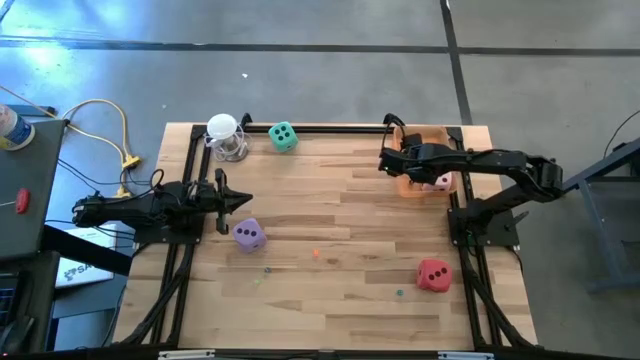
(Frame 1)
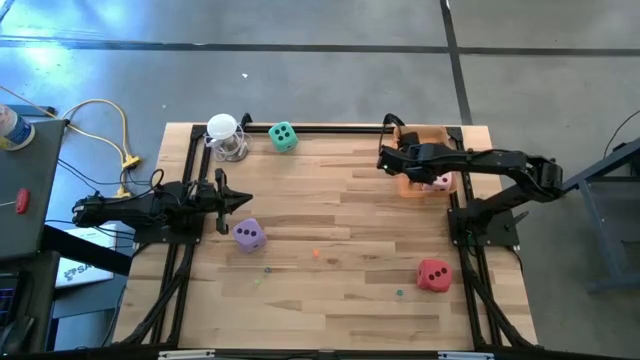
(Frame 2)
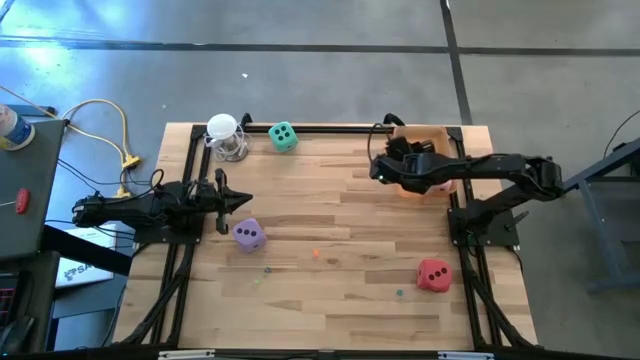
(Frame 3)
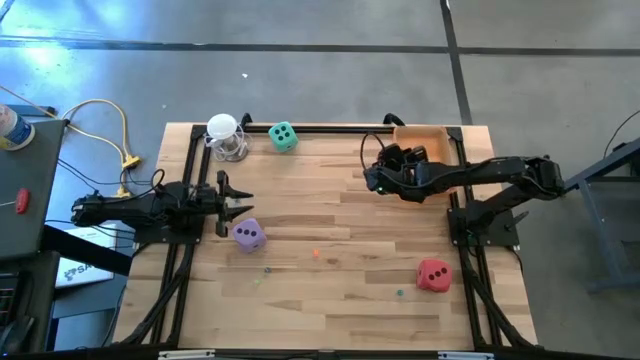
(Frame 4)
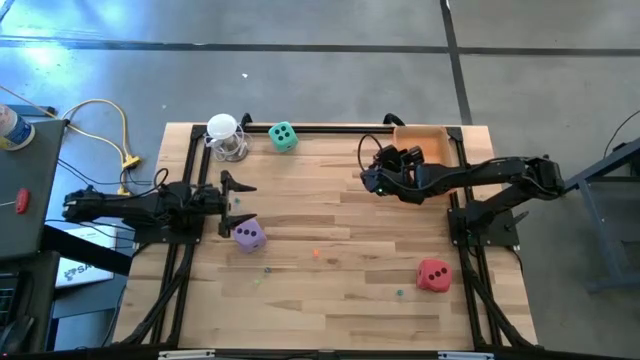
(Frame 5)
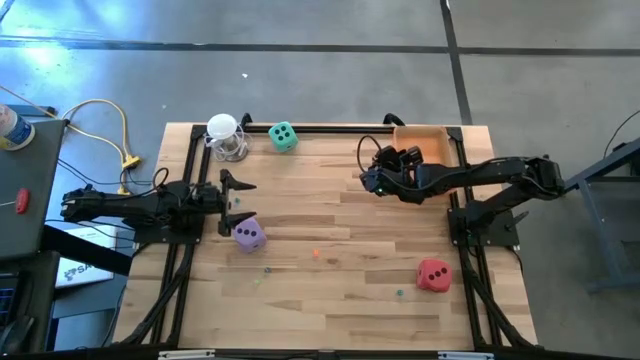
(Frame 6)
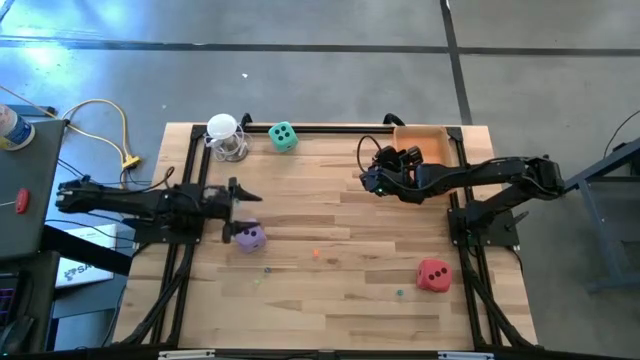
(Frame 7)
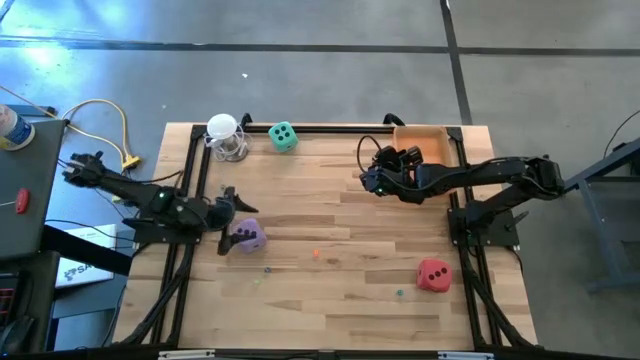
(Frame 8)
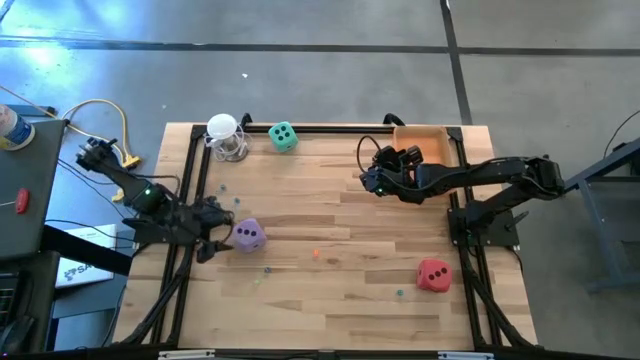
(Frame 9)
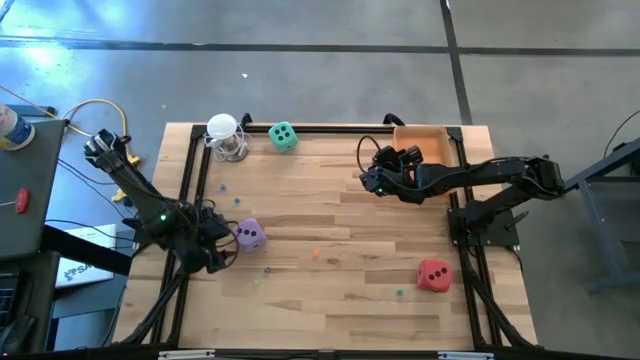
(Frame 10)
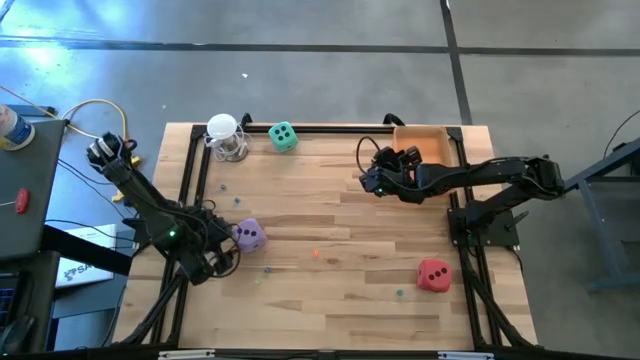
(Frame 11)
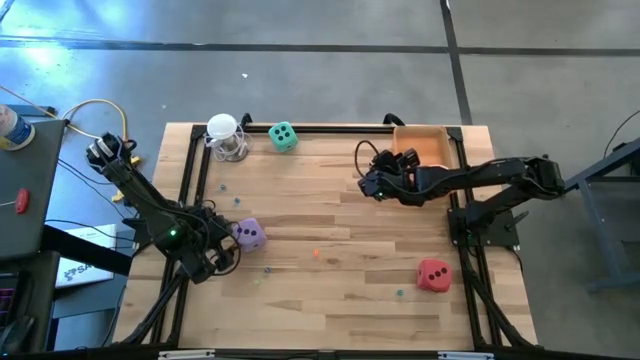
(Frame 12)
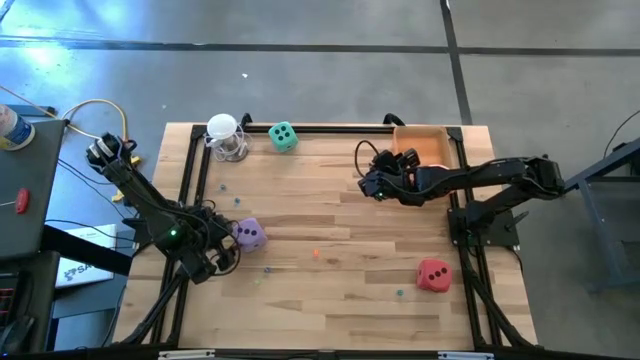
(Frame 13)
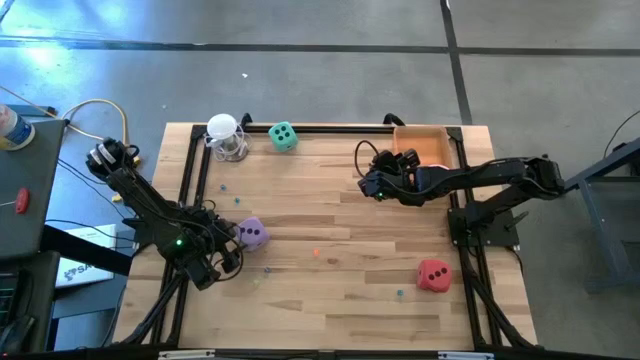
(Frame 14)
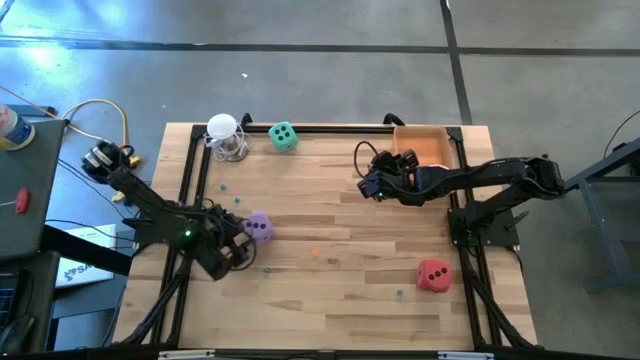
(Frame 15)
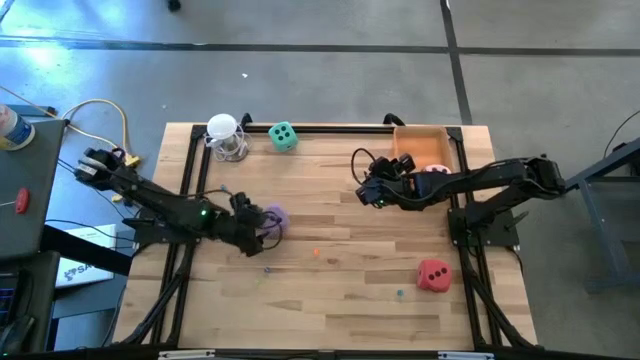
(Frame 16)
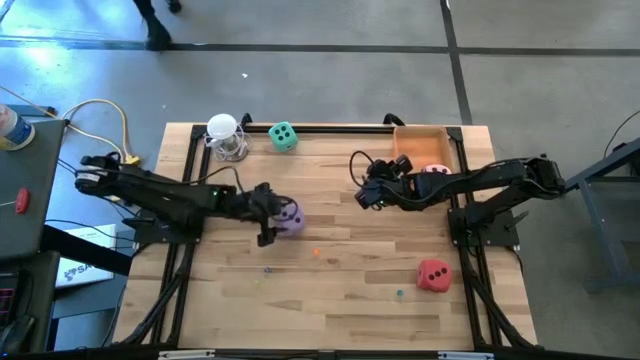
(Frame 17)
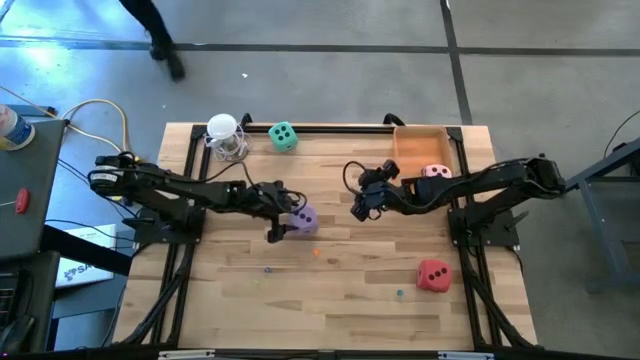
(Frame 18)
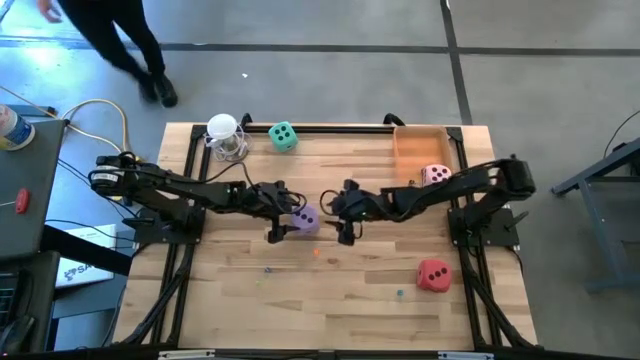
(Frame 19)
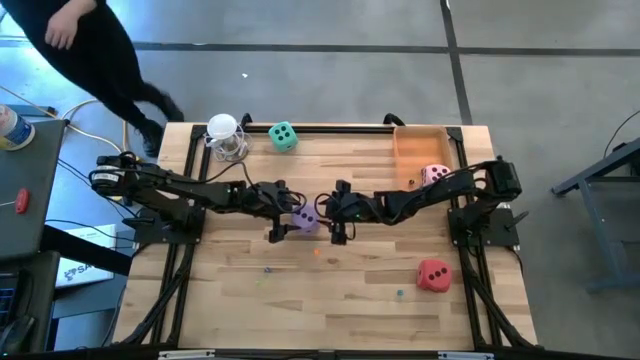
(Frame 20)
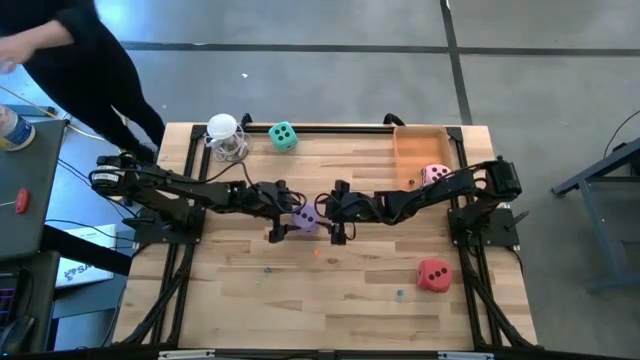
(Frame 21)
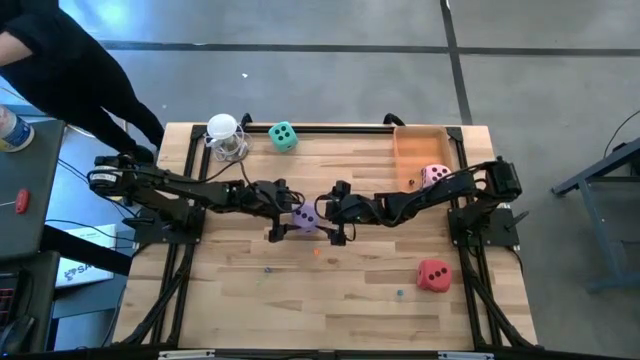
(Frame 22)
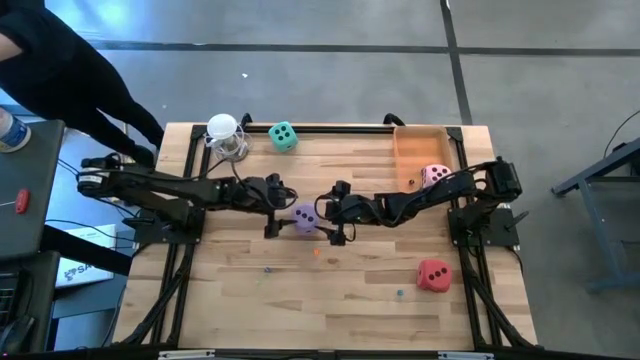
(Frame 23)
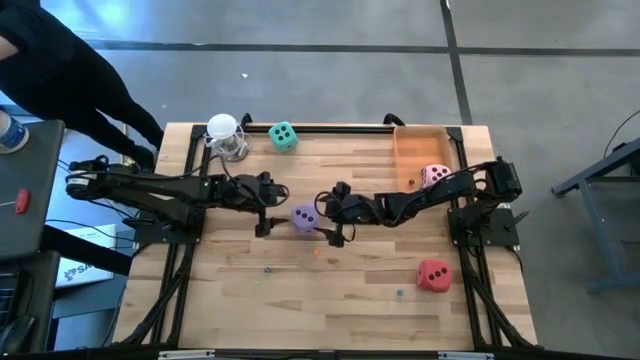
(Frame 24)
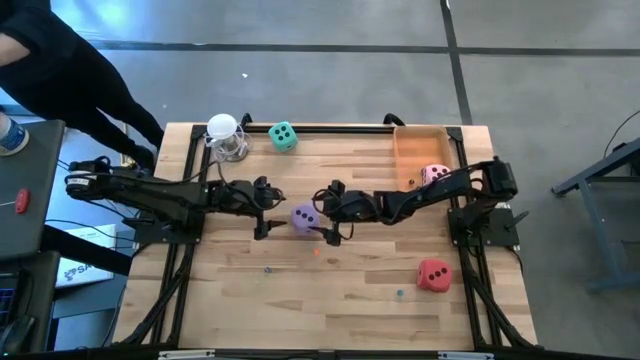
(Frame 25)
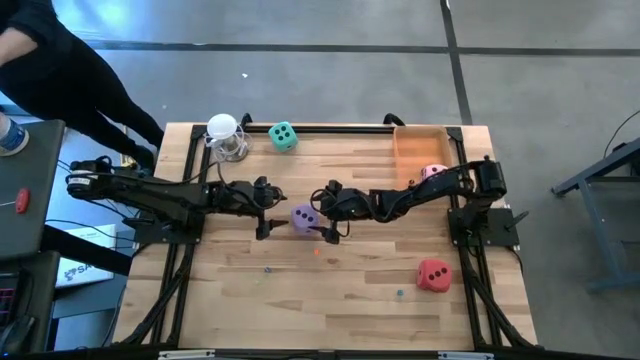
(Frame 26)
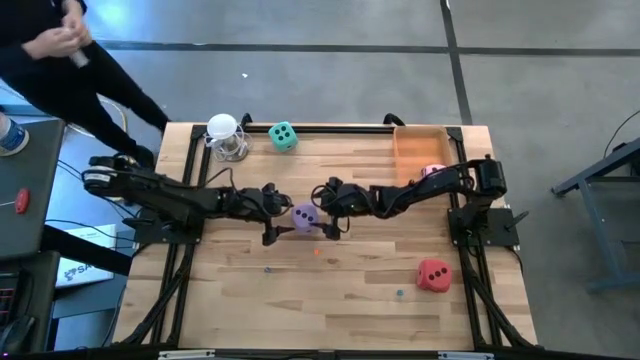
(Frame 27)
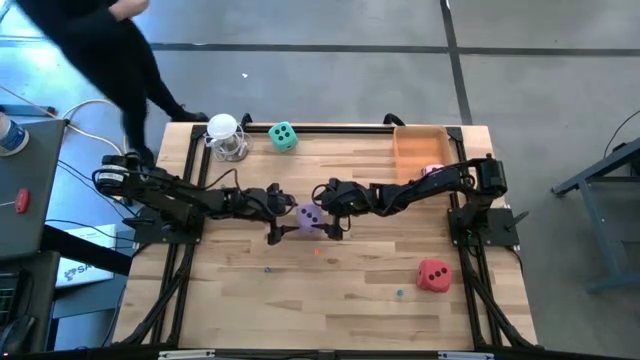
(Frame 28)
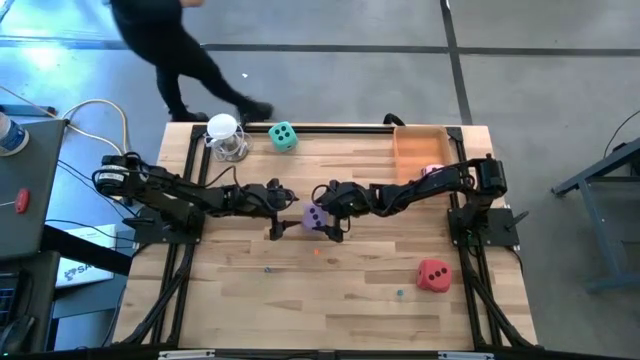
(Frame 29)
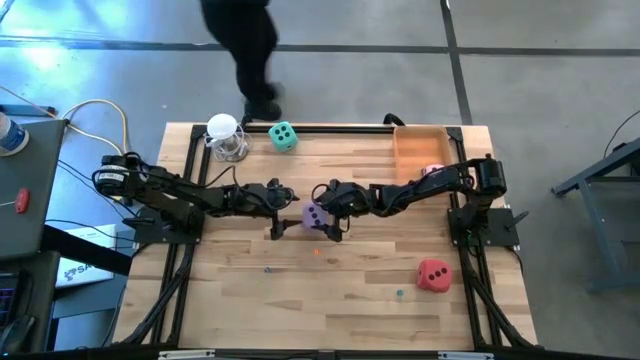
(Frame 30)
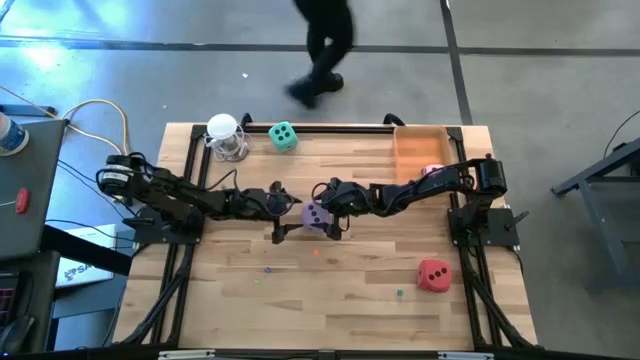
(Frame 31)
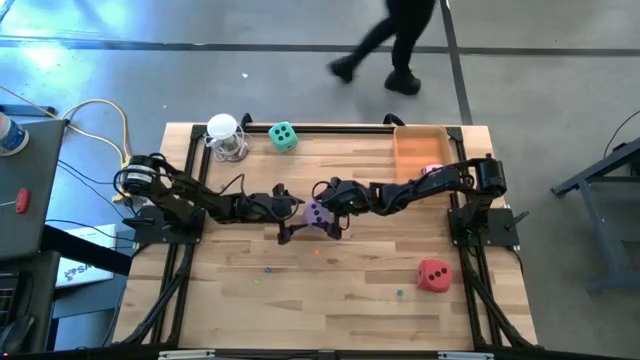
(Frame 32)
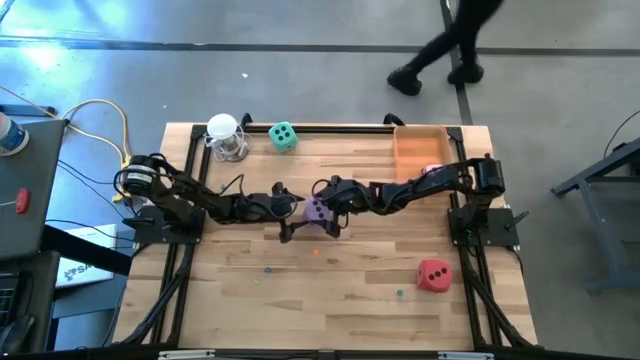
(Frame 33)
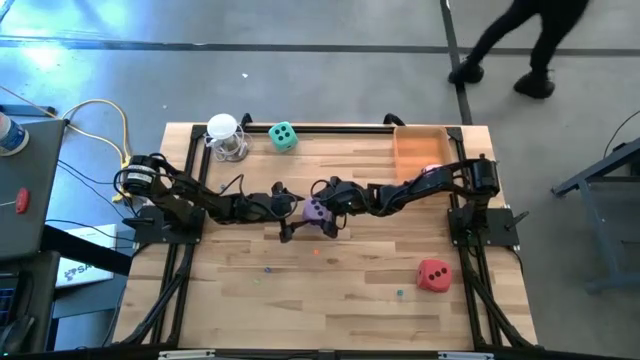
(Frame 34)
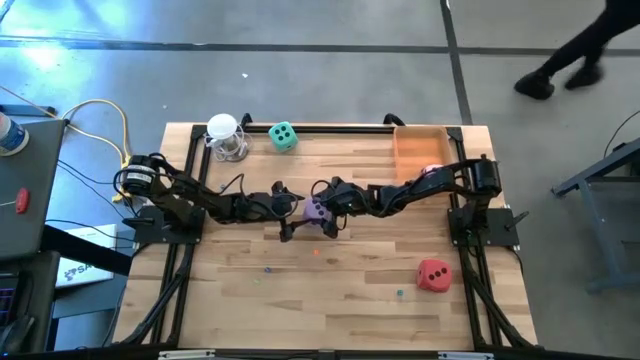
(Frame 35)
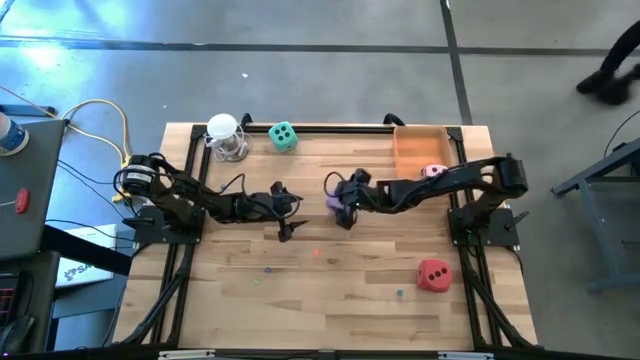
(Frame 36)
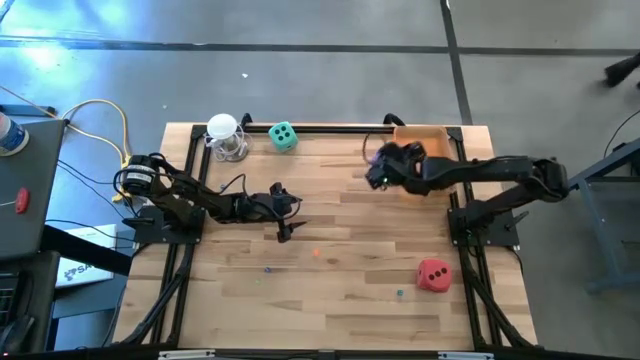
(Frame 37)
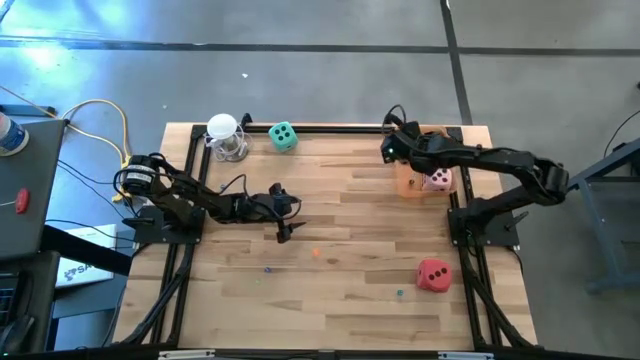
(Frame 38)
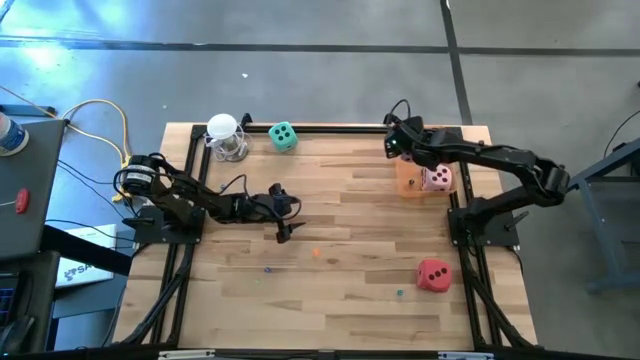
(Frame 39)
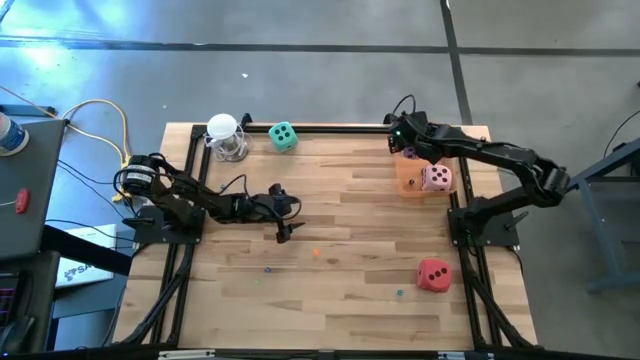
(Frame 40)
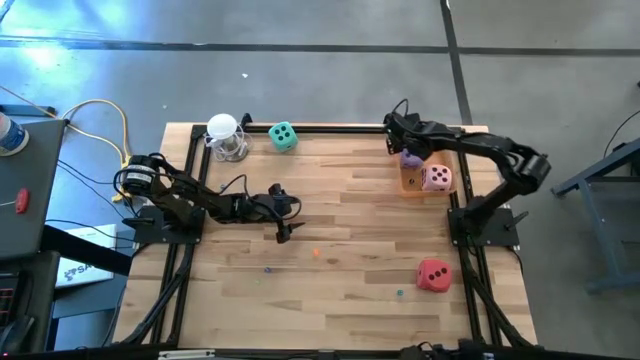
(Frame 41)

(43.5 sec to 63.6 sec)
Task: Pick & Place Dice
Put the purple large die into the orange bin
